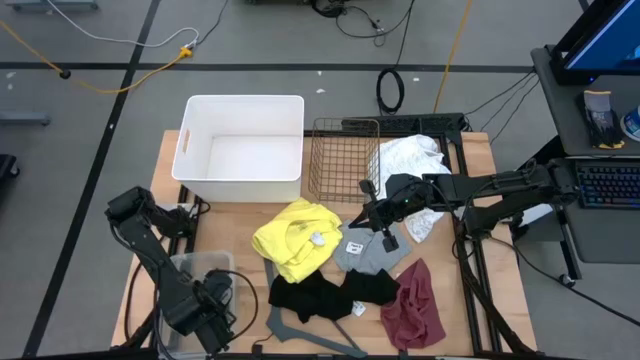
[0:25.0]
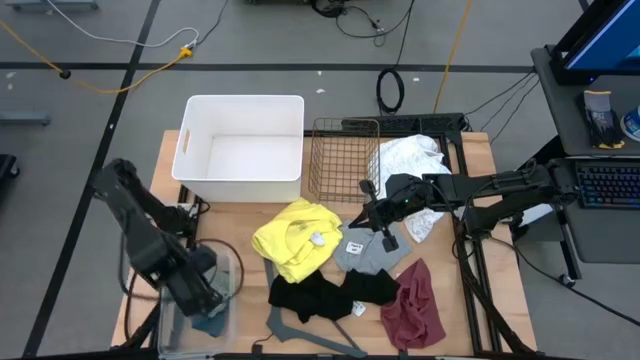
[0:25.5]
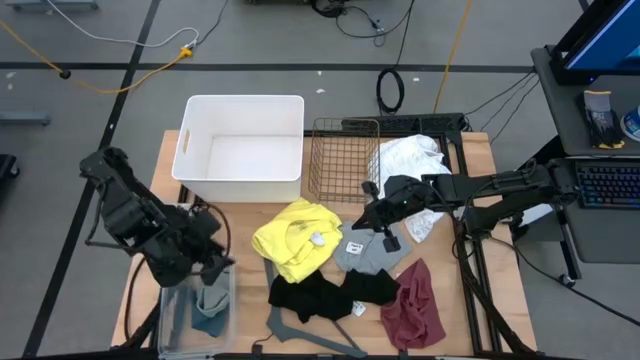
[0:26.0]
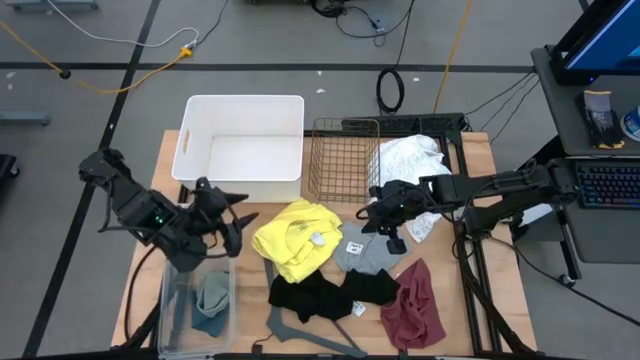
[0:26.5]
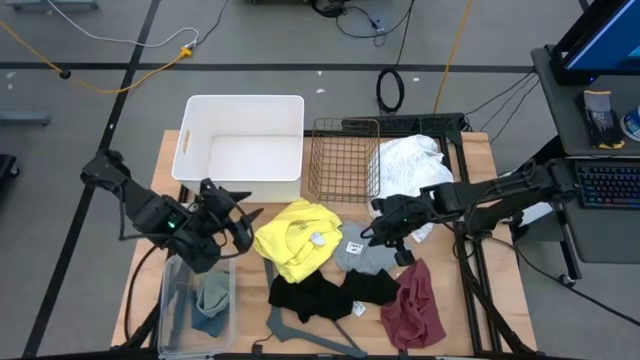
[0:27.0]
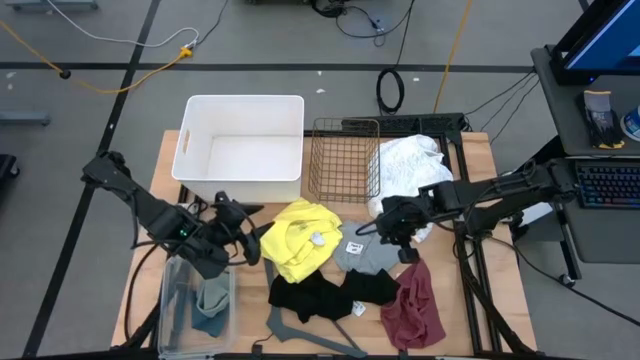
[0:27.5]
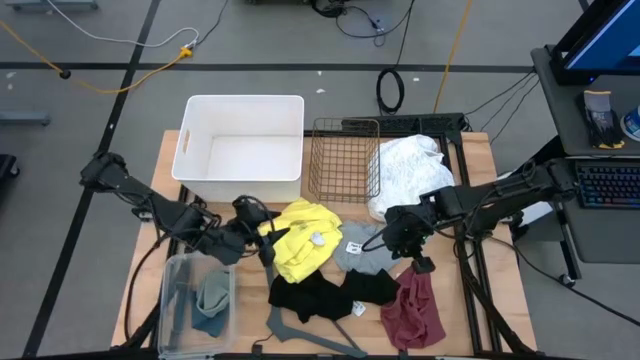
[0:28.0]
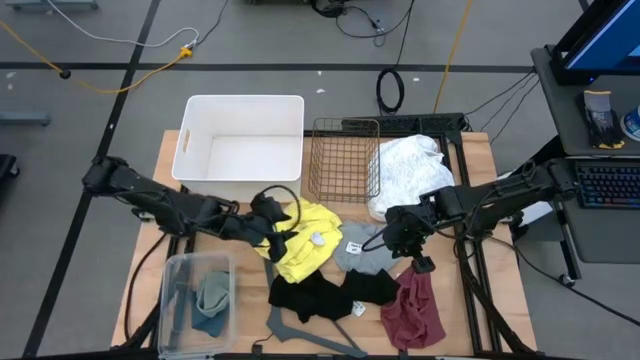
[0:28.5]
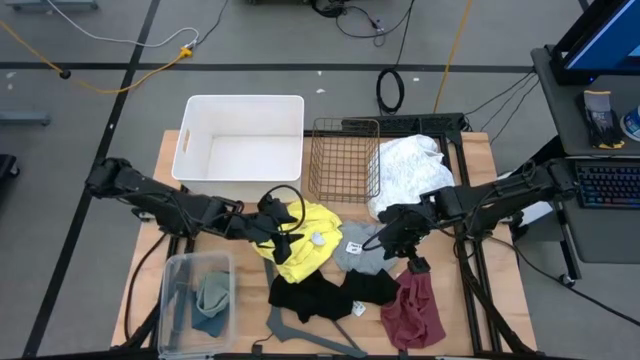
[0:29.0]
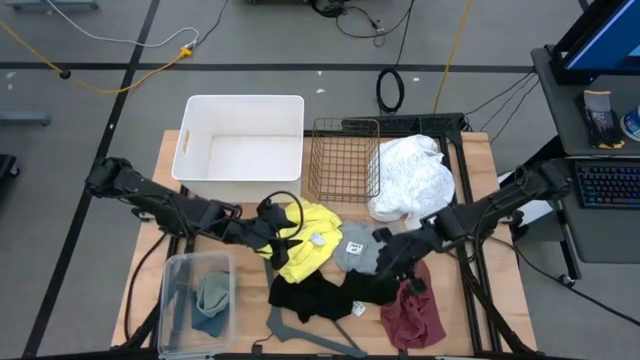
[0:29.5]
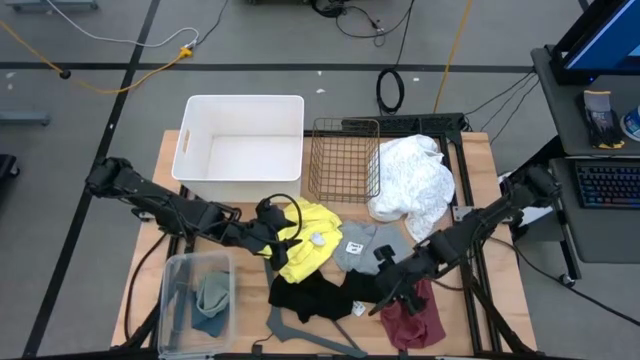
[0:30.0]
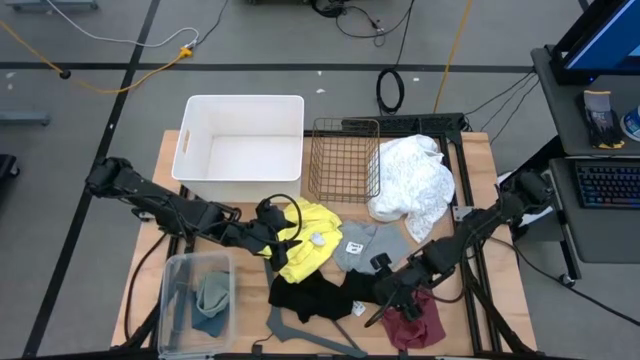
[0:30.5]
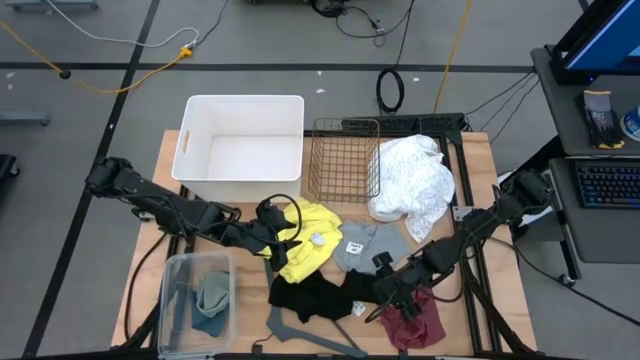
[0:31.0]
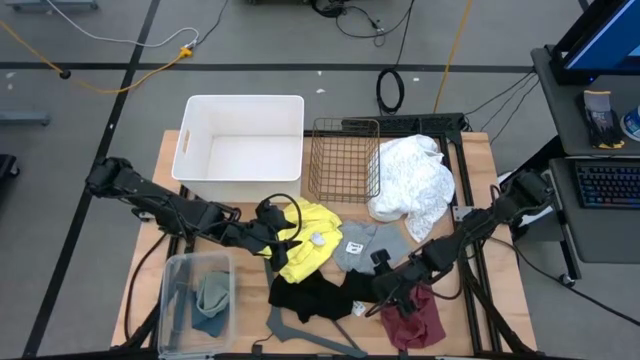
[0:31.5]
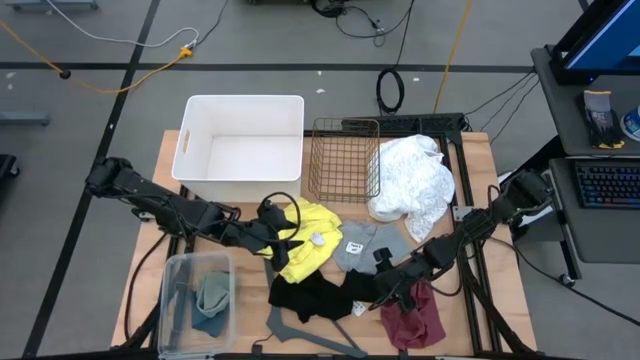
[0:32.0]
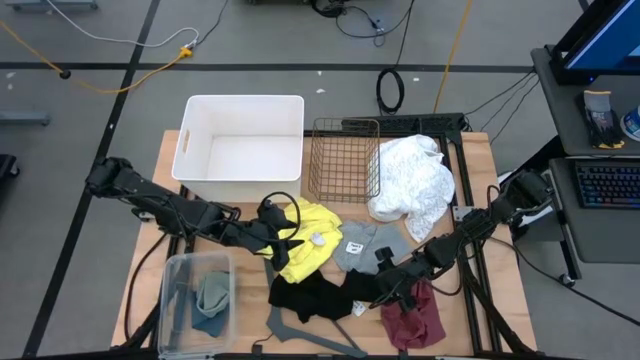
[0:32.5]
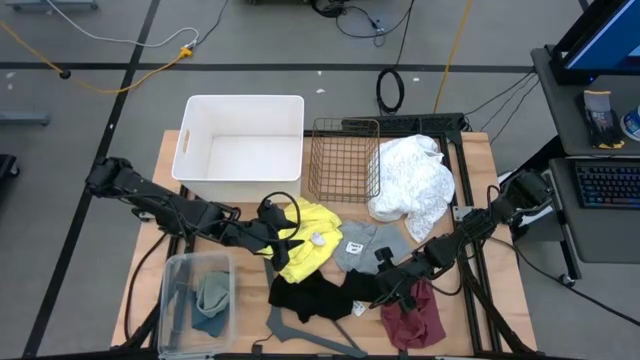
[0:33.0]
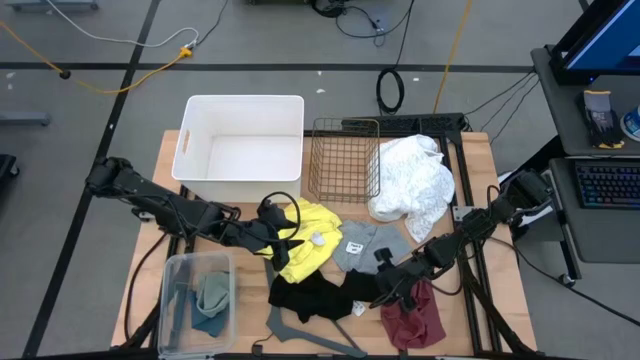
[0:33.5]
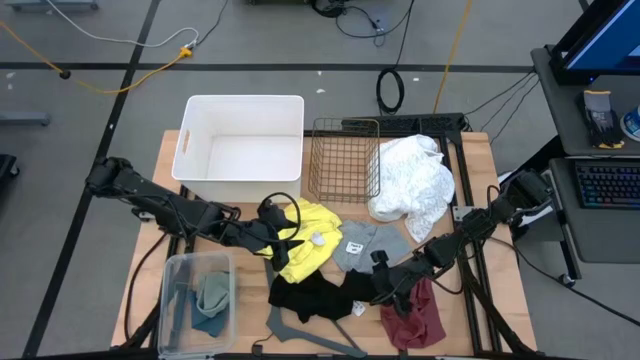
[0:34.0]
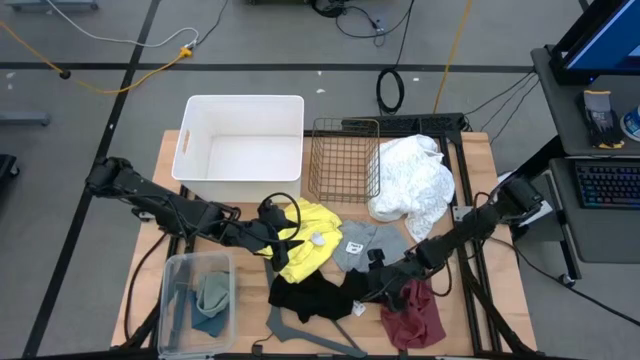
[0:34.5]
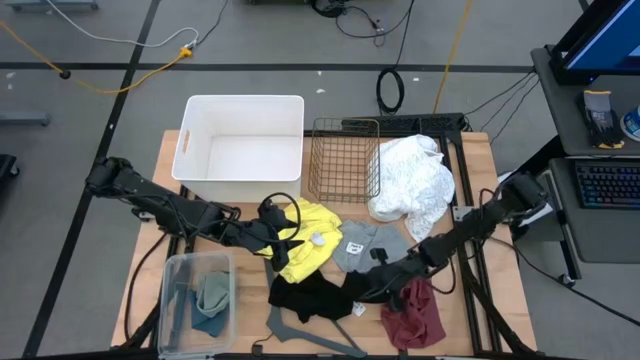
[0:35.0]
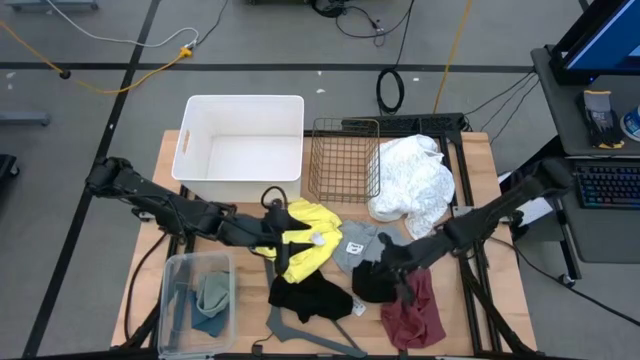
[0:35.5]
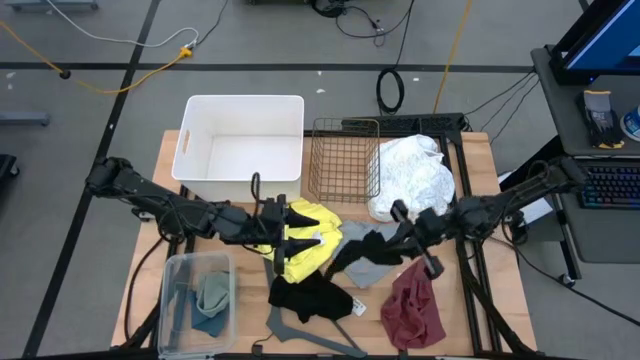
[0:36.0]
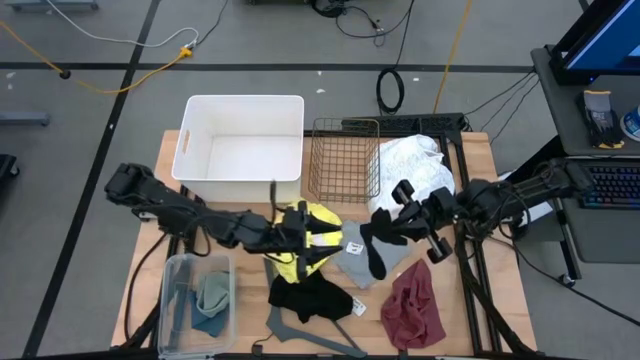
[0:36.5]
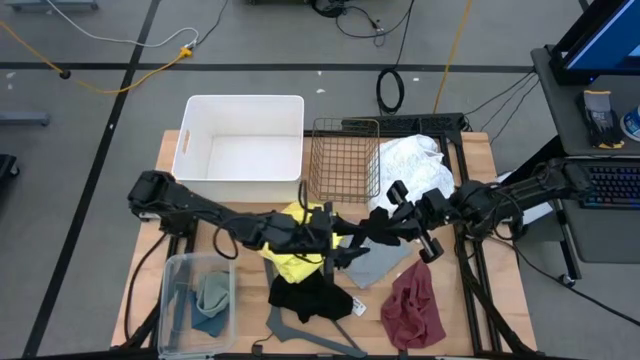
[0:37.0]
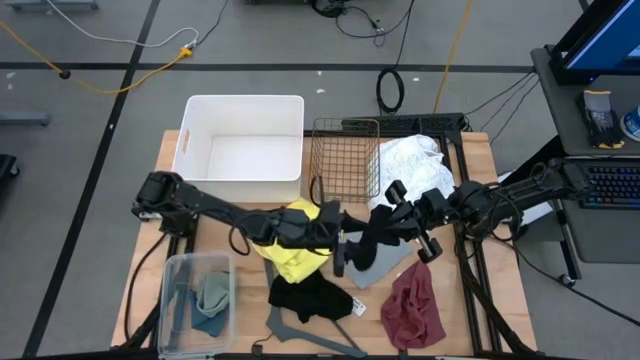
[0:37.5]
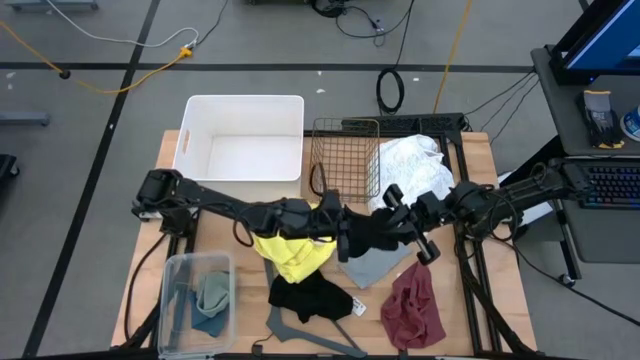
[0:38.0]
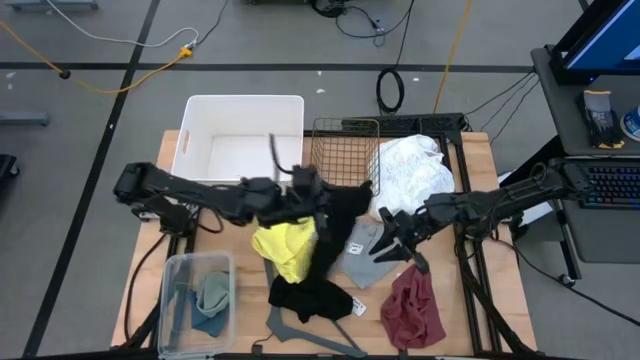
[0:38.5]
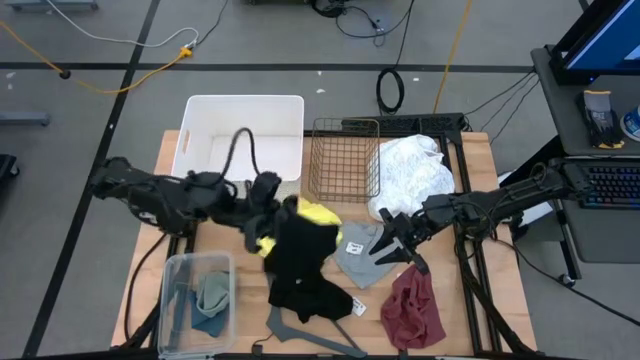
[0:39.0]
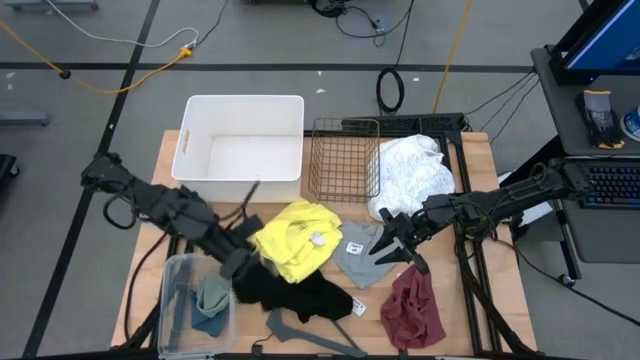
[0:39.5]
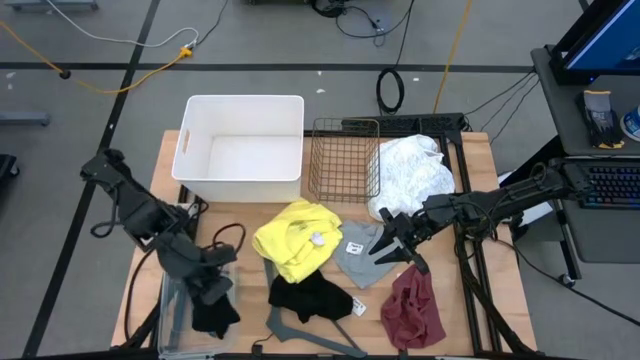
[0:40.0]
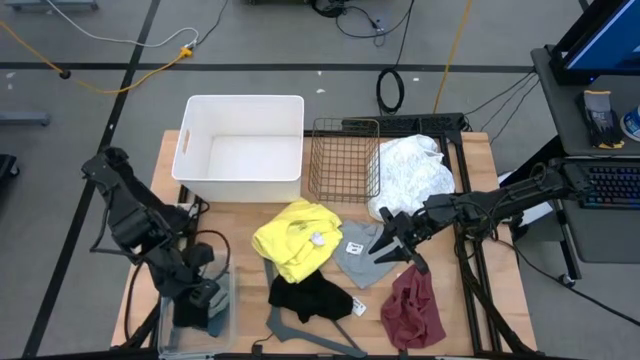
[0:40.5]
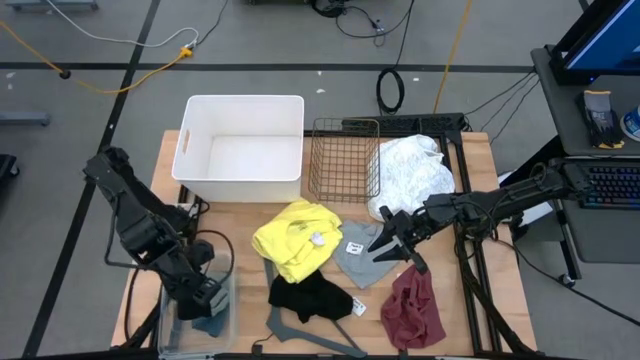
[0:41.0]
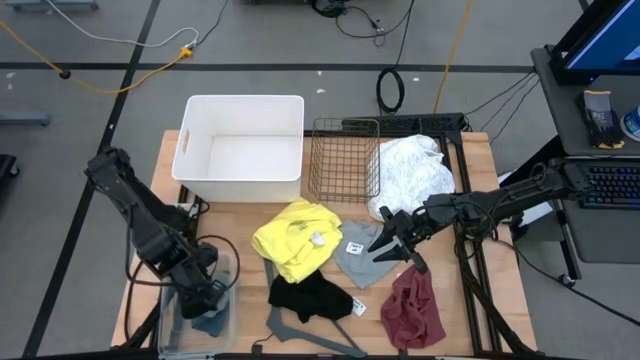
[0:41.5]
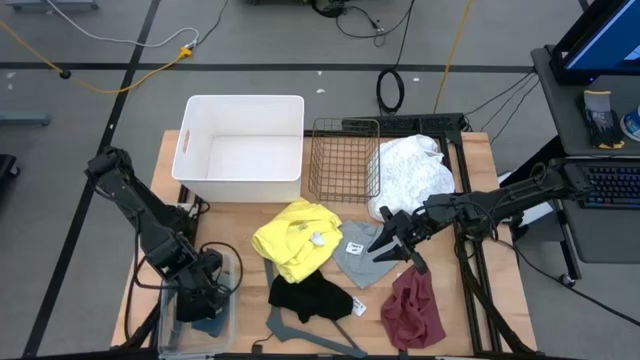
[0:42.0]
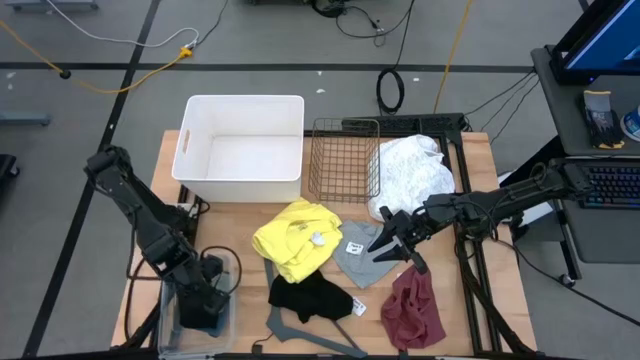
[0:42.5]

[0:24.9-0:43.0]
Task: Pick & Place Cloths
Put the black sock into the transparent bin

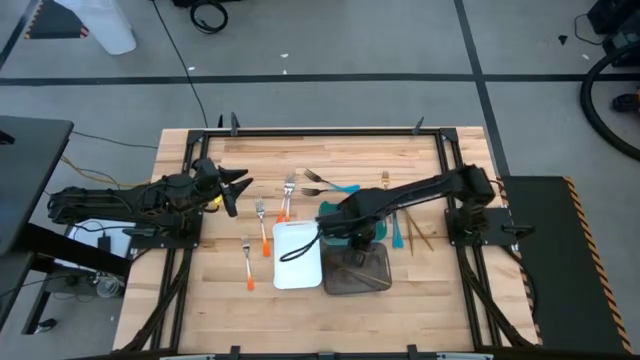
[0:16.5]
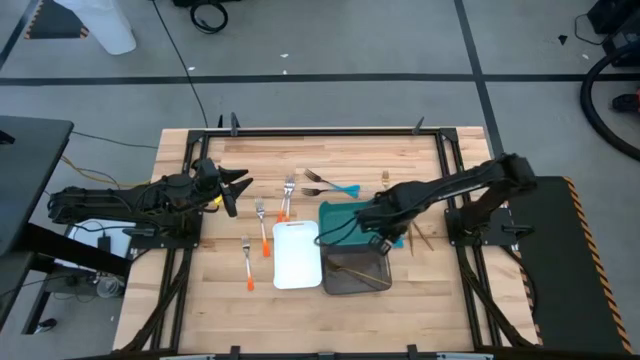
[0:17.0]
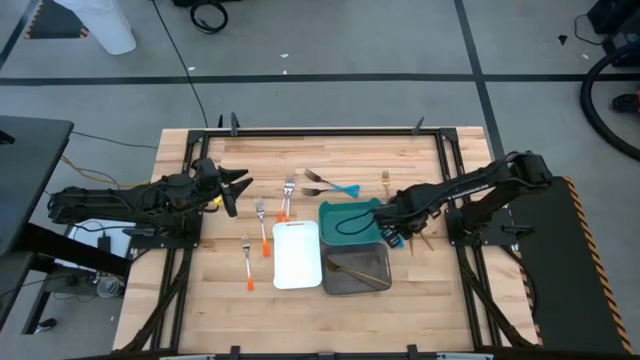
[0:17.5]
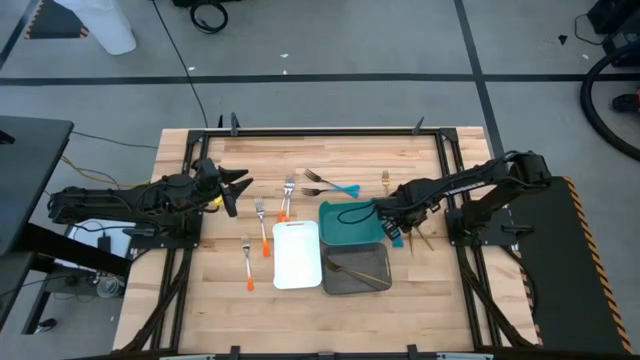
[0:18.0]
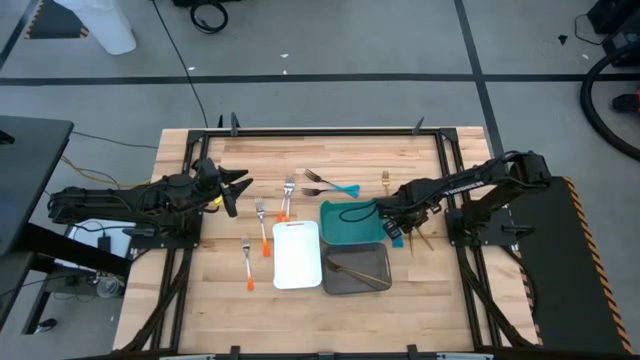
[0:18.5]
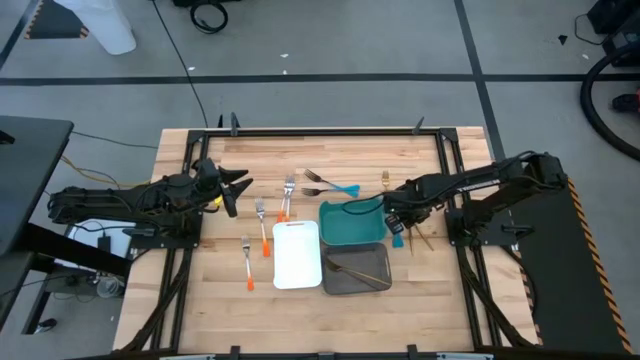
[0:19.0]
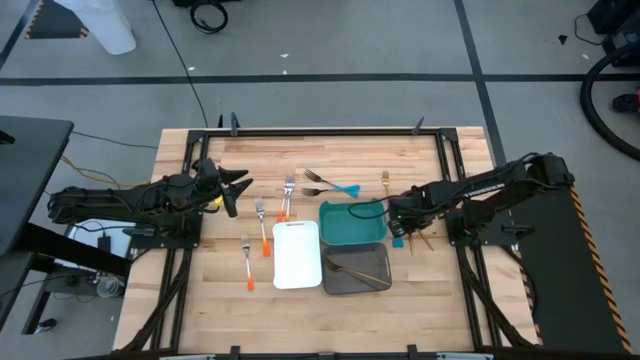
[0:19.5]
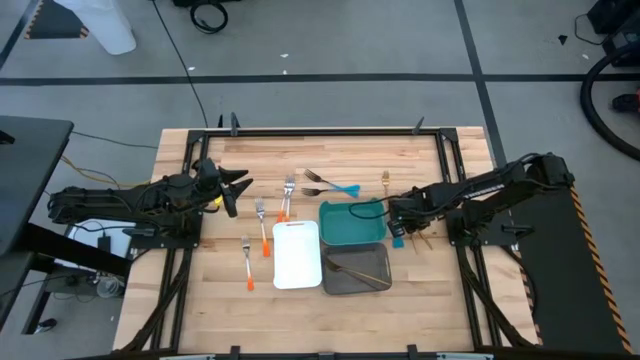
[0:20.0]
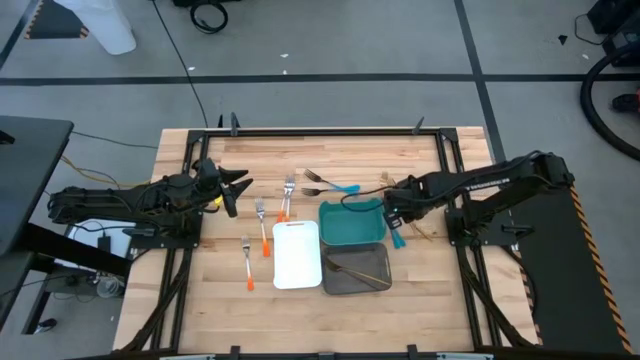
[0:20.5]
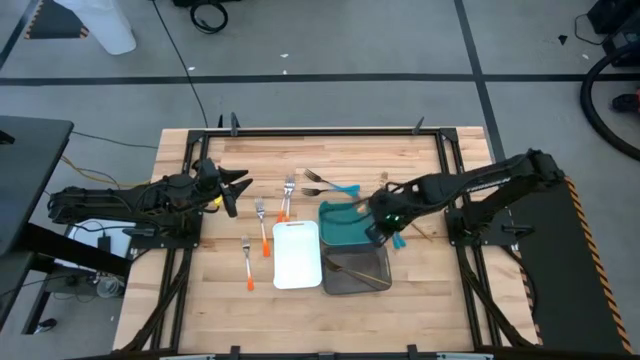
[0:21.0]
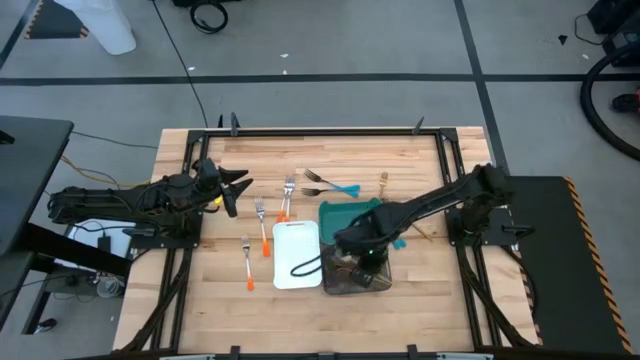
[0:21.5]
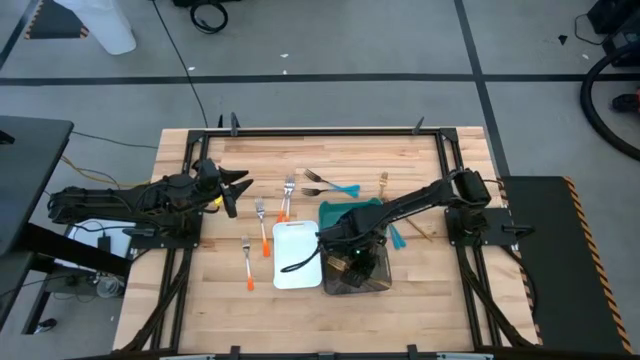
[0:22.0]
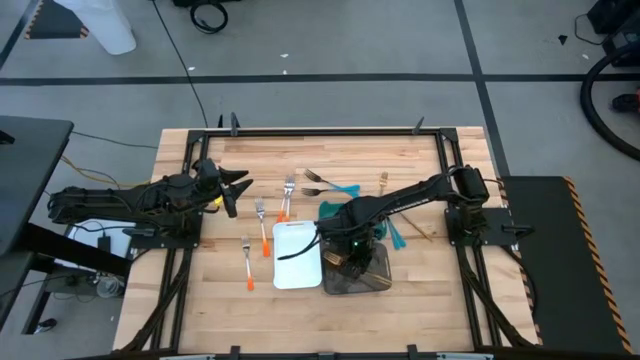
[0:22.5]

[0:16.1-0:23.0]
Task: Sort silverware by color (type)
Put the gold fork into the black bin
